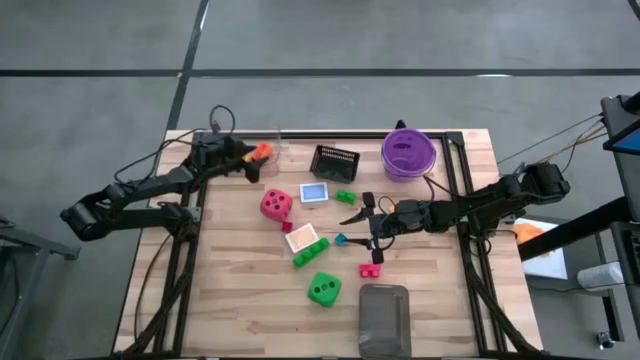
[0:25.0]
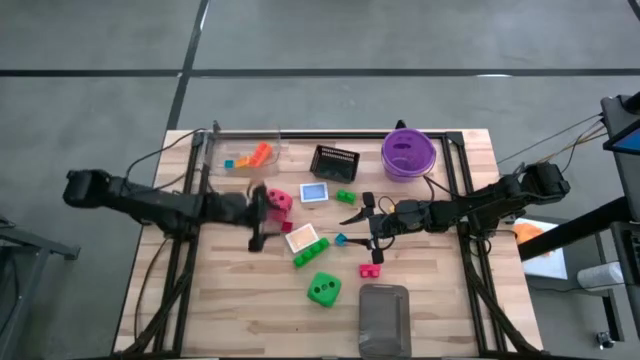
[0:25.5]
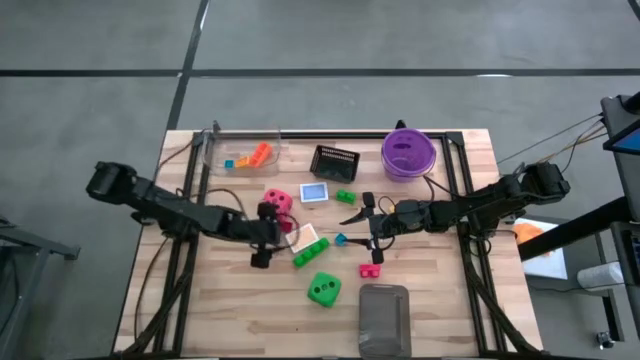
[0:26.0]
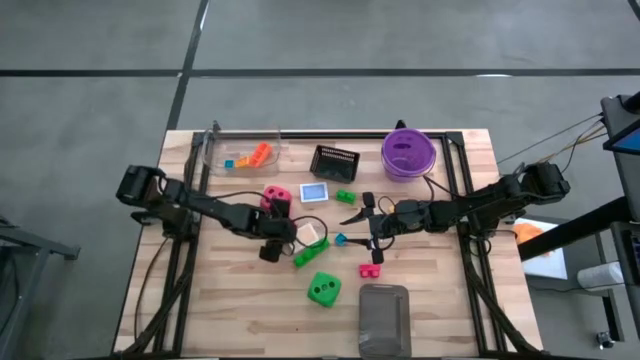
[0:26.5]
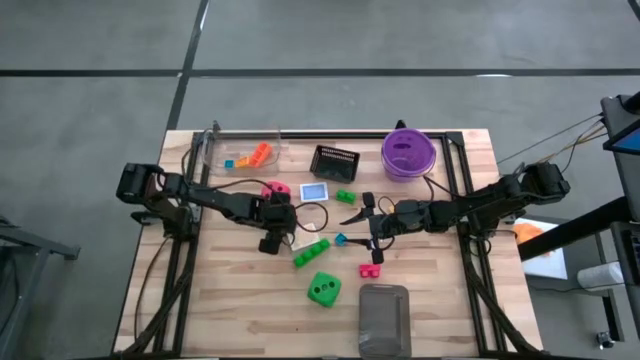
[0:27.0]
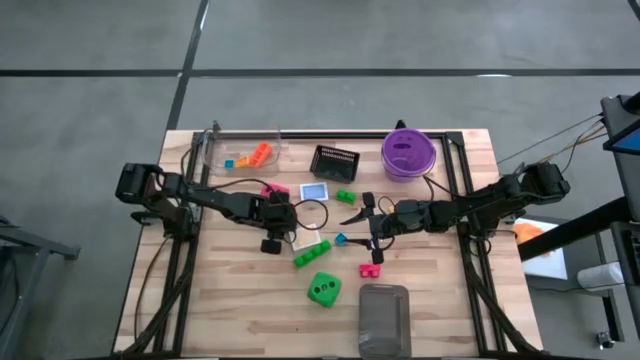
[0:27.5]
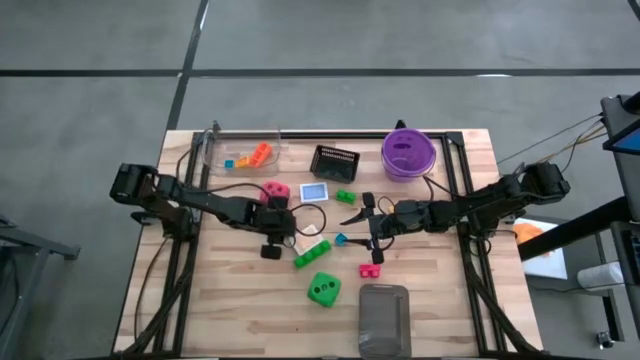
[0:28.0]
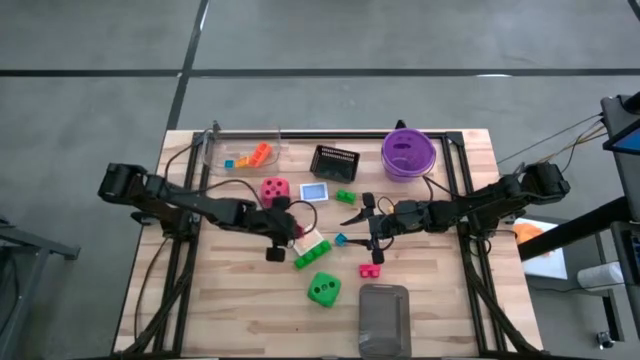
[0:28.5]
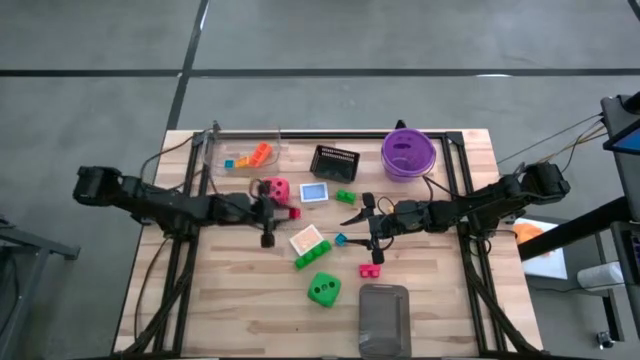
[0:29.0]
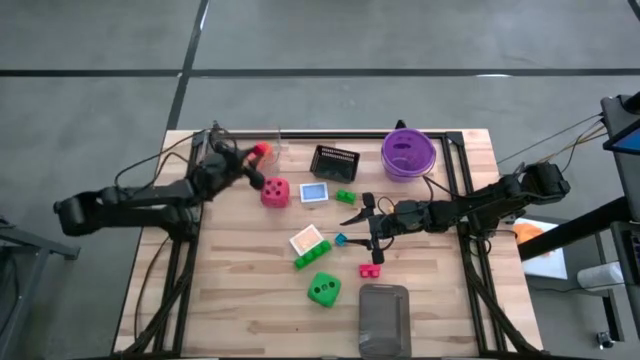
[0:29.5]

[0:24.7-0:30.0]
Task: Pick & Place Toys
Put the top red game piece into the transparent bin

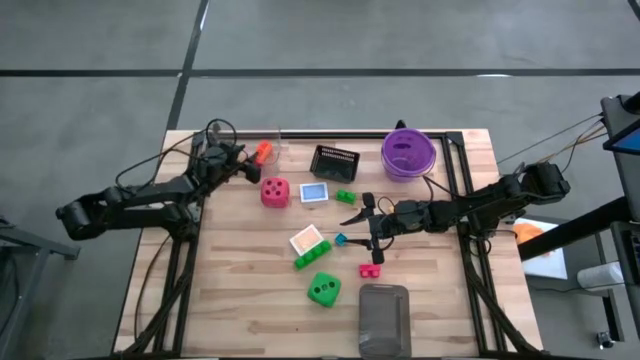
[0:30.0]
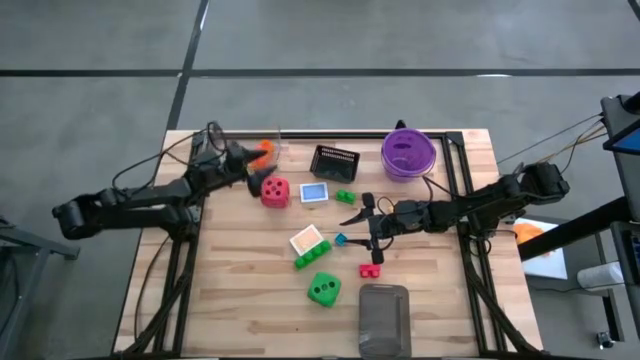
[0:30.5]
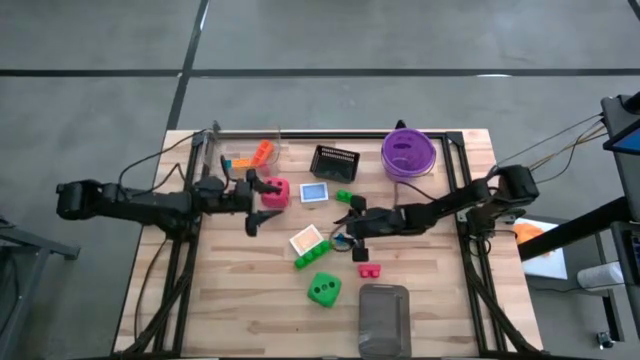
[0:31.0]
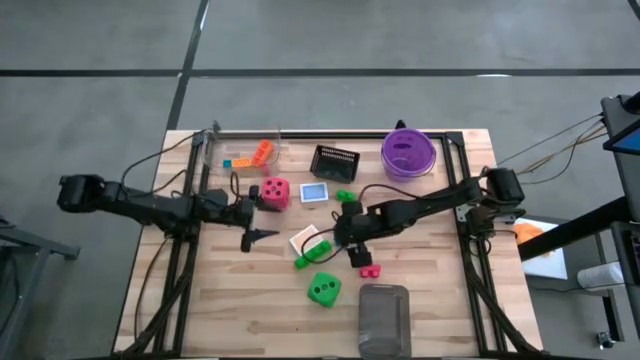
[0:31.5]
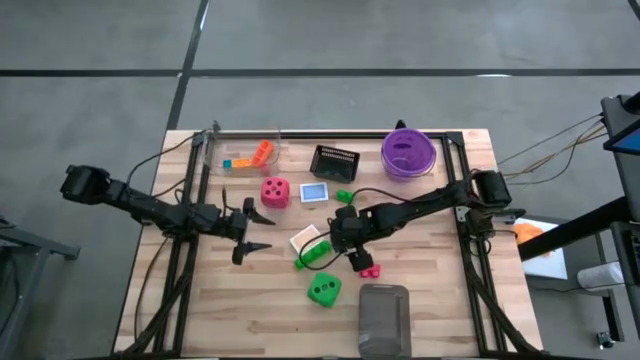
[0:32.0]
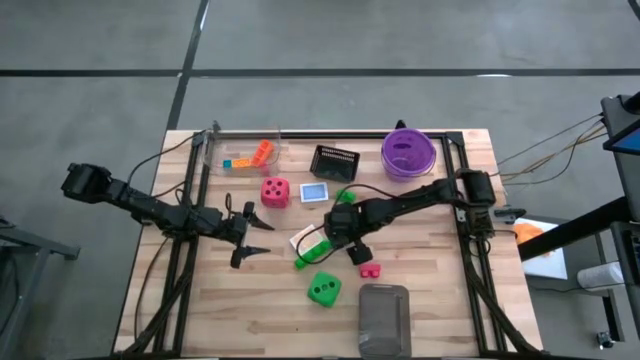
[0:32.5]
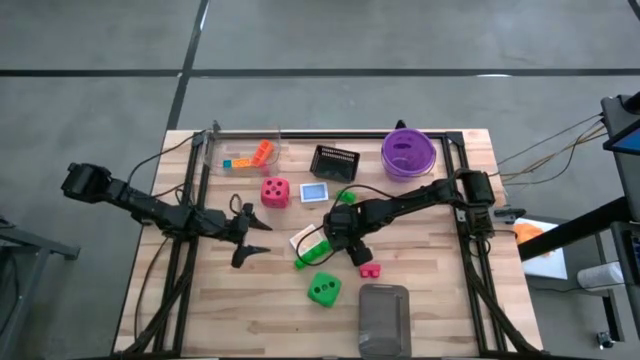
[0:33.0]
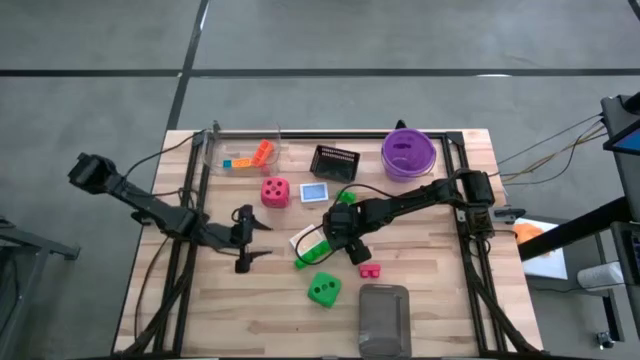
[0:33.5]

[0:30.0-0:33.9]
Put the blue game piece into the transparent bin

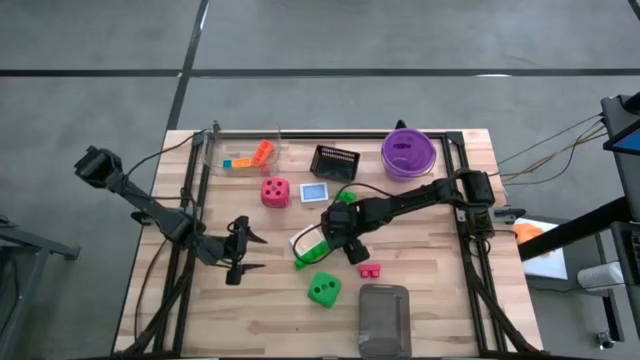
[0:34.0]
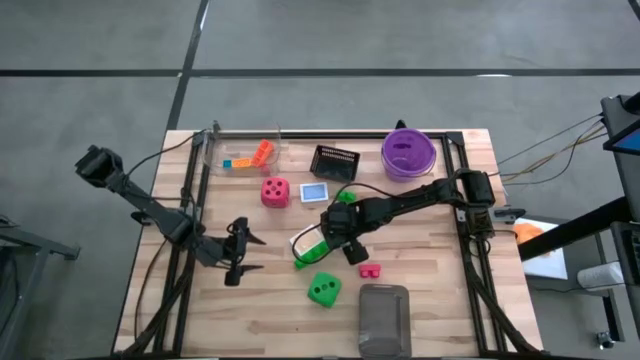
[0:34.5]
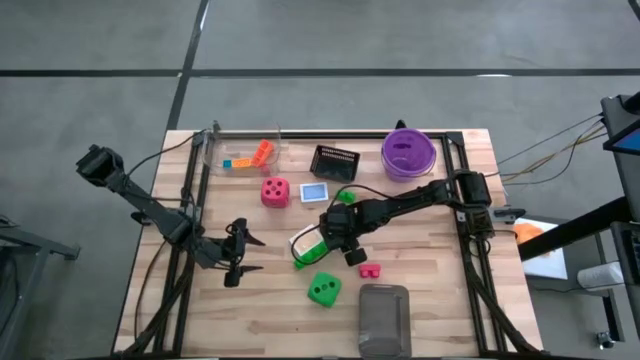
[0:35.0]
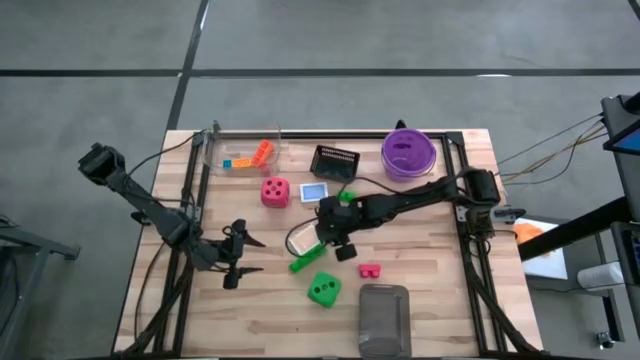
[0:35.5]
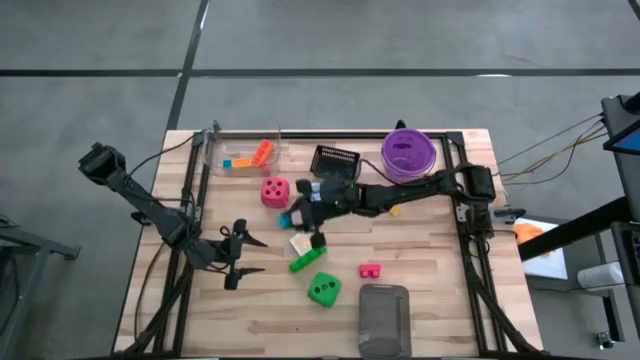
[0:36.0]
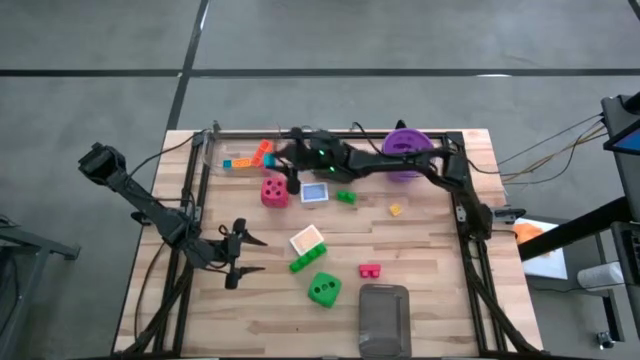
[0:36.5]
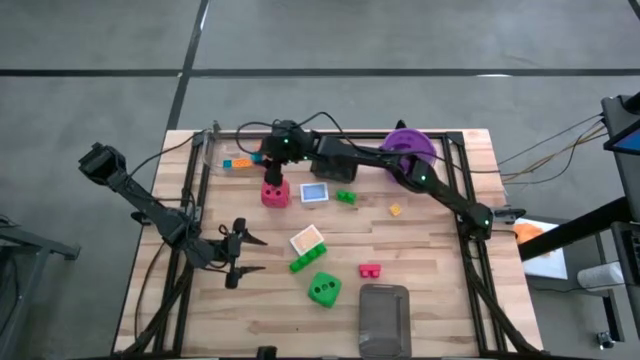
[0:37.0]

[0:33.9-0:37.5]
Put the blue game piece into the transparent bin

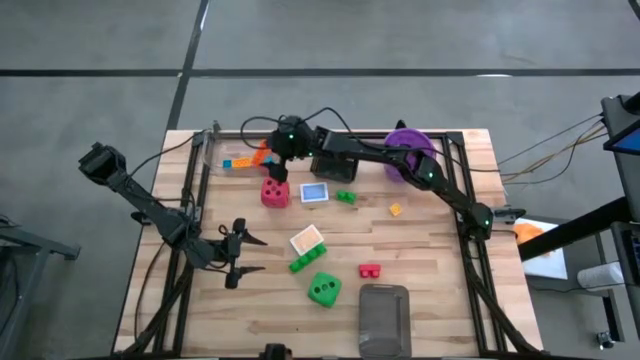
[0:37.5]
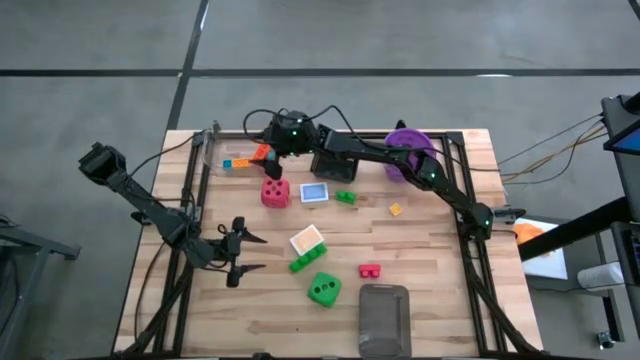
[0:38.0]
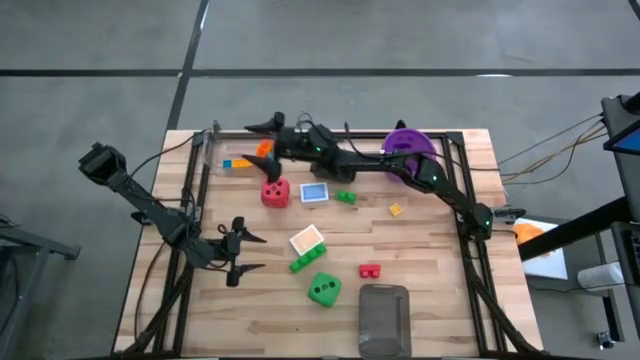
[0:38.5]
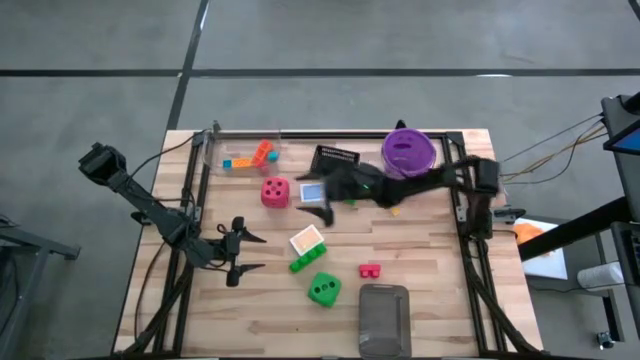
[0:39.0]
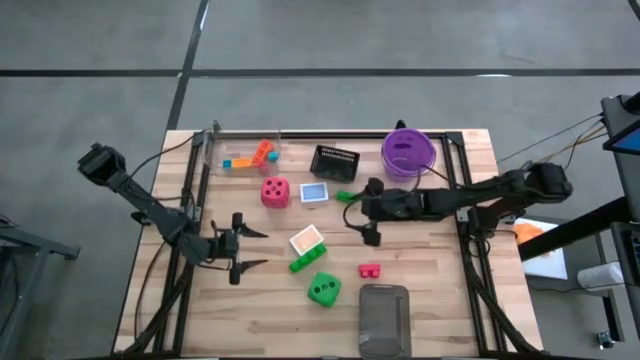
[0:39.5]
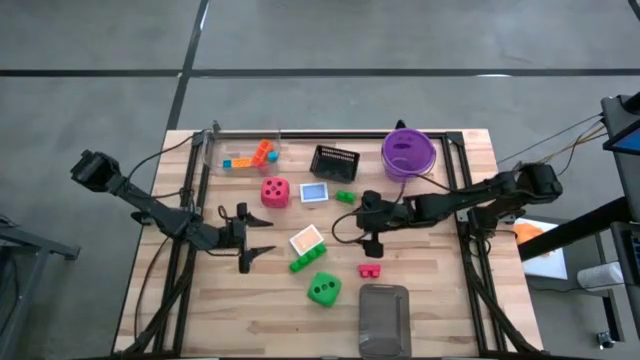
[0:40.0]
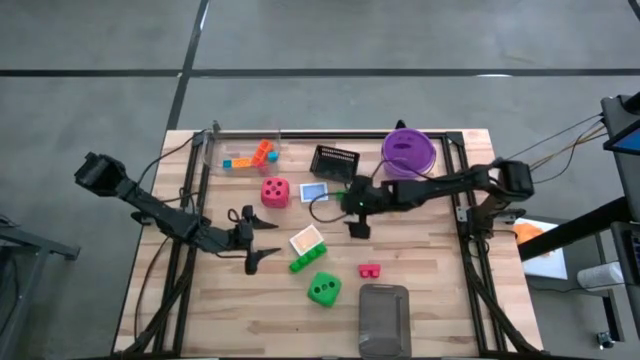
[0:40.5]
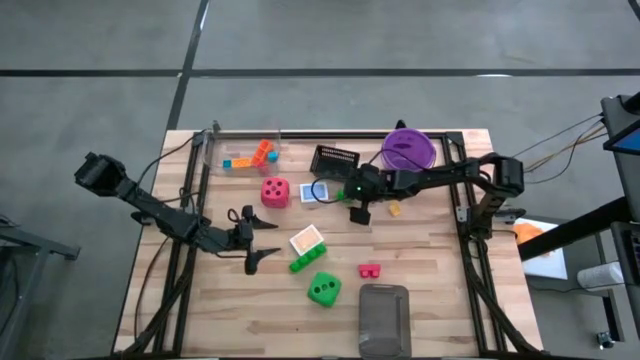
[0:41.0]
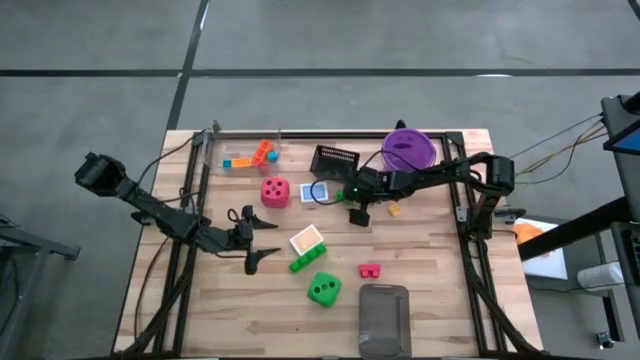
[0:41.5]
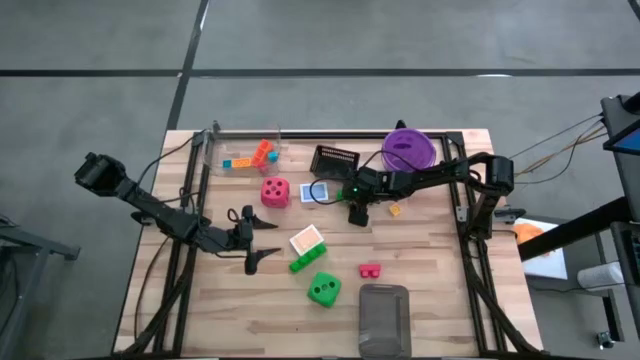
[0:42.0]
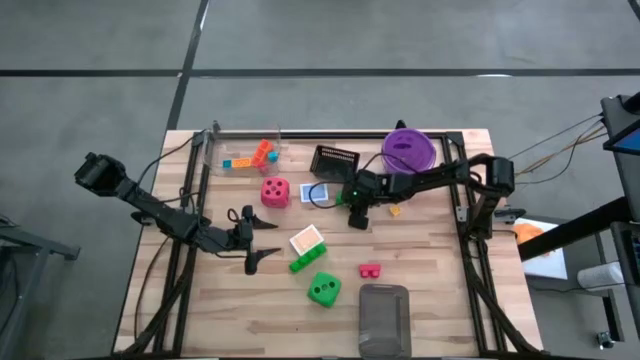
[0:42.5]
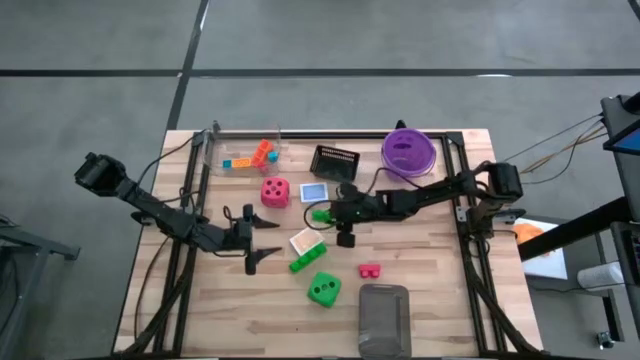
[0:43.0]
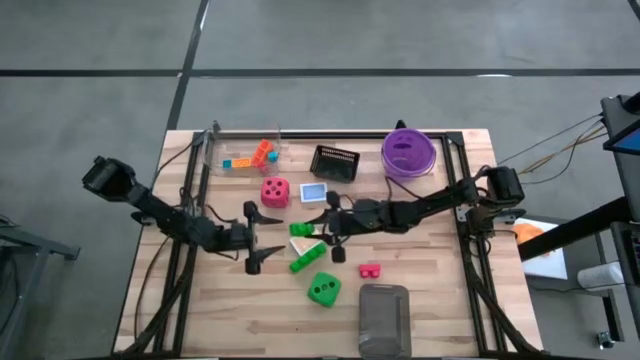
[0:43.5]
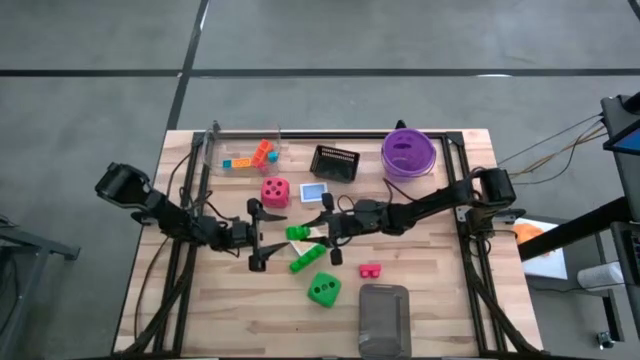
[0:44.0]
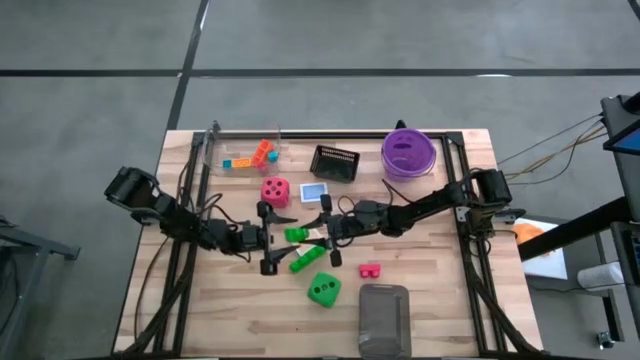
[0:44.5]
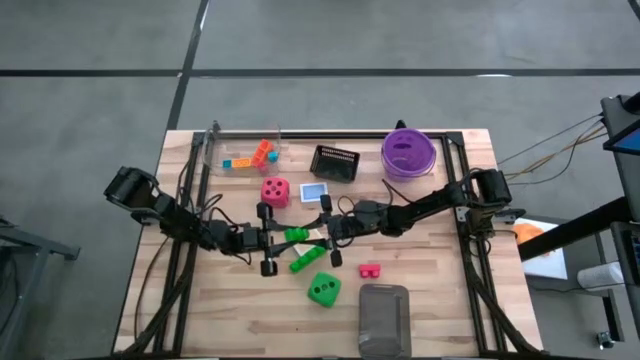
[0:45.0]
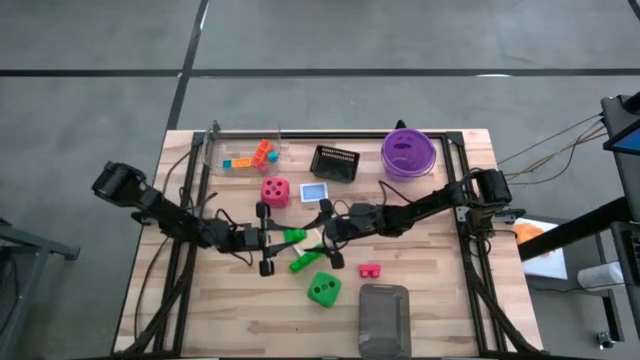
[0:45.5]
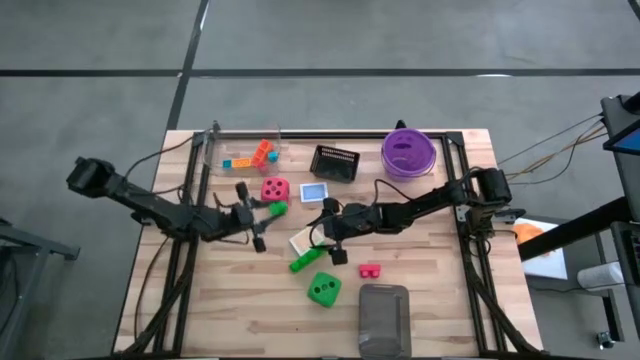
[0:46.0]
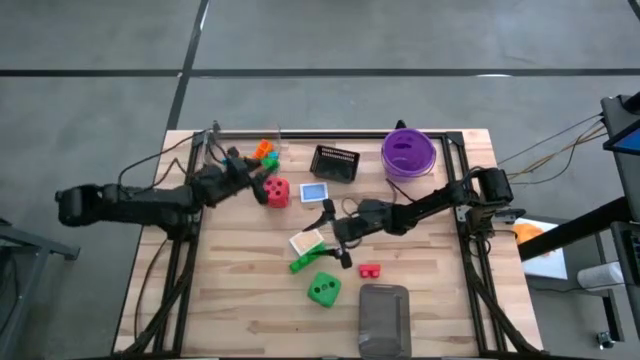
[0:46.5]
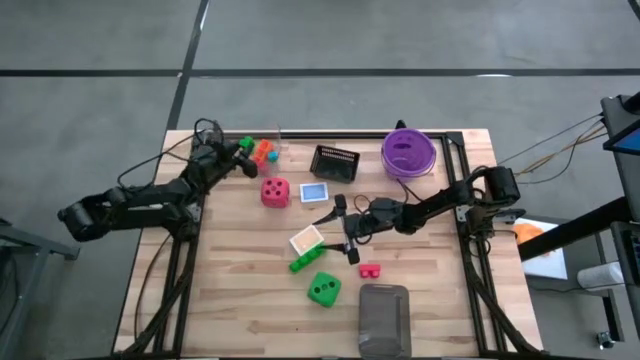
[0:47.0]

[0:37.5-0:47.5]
Put the top green game piece into the transparent bin
